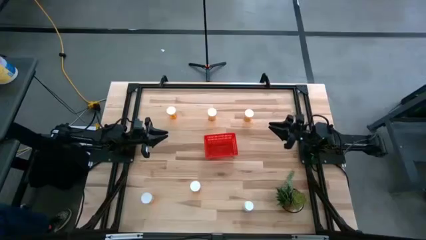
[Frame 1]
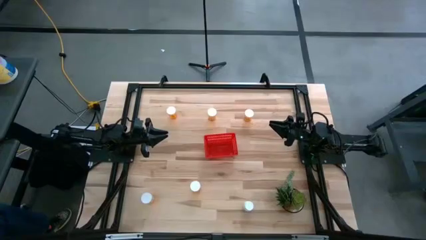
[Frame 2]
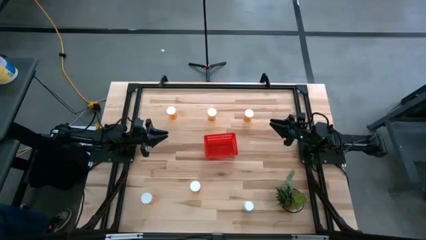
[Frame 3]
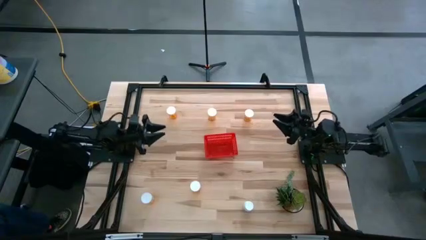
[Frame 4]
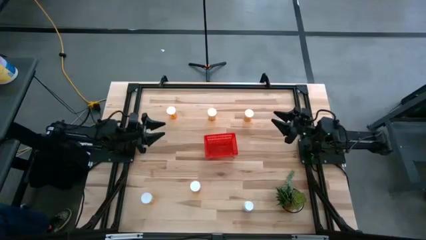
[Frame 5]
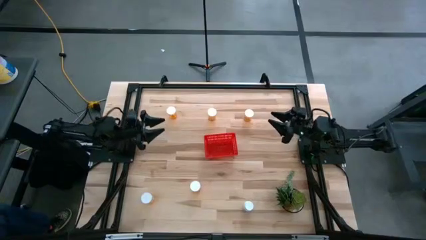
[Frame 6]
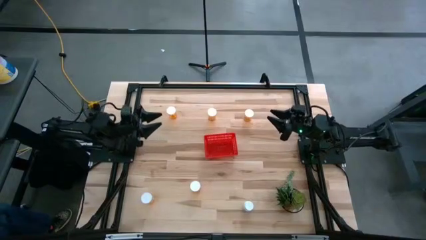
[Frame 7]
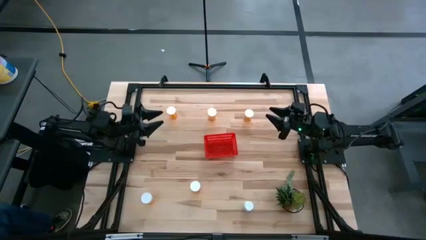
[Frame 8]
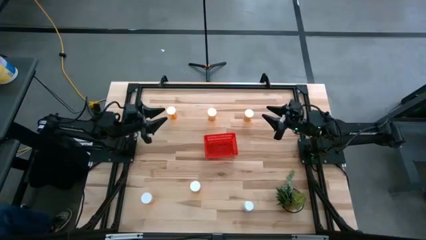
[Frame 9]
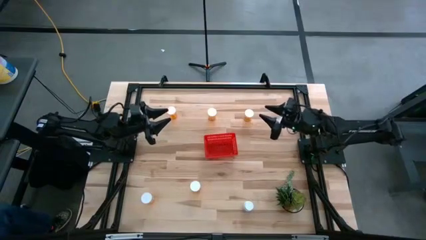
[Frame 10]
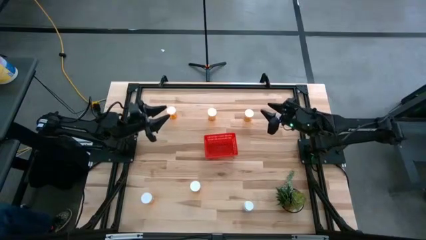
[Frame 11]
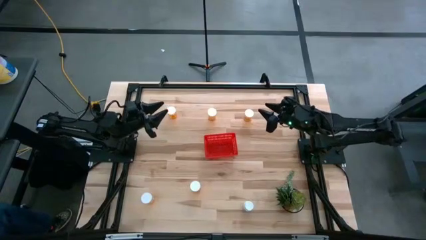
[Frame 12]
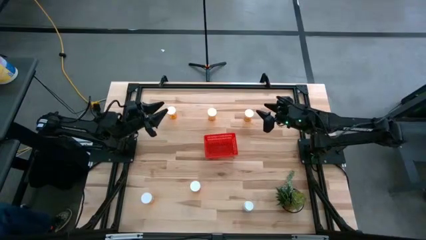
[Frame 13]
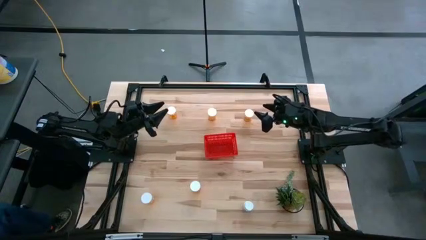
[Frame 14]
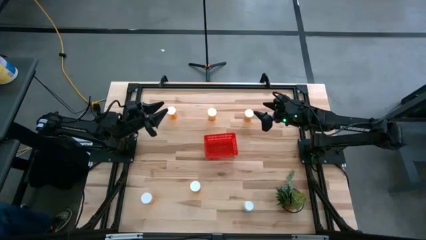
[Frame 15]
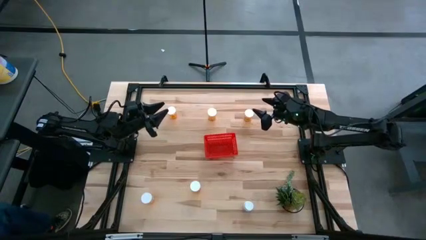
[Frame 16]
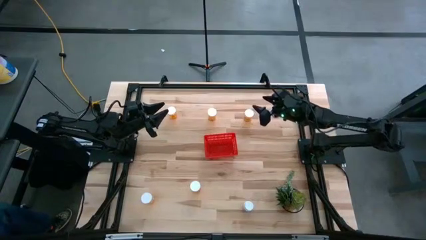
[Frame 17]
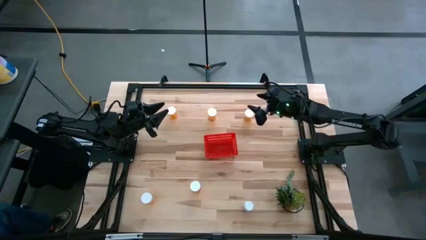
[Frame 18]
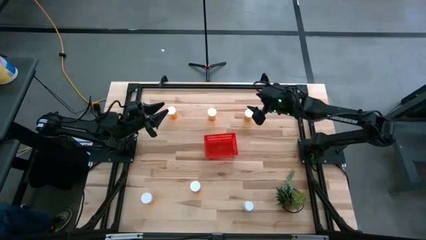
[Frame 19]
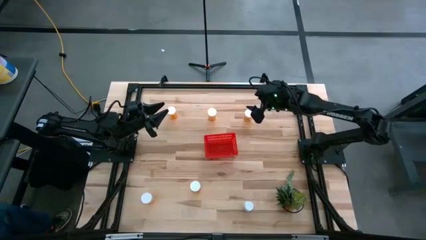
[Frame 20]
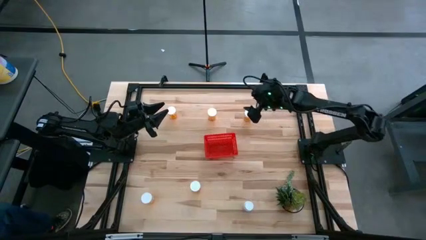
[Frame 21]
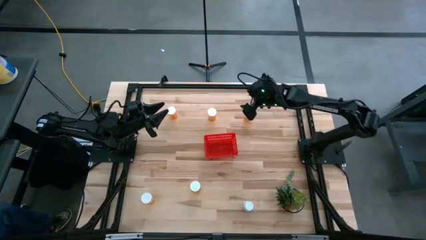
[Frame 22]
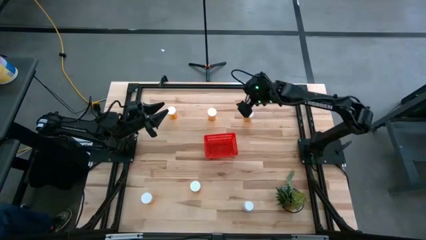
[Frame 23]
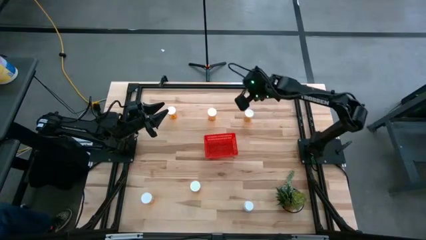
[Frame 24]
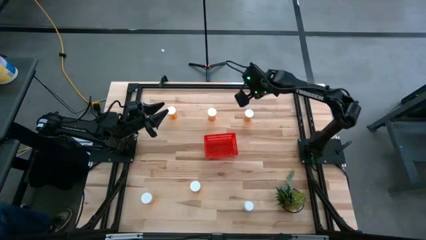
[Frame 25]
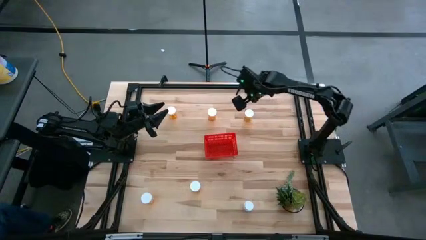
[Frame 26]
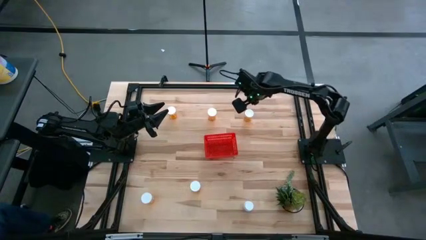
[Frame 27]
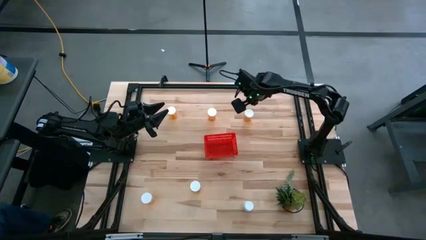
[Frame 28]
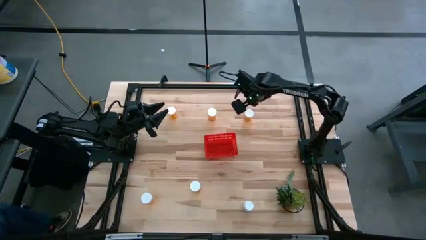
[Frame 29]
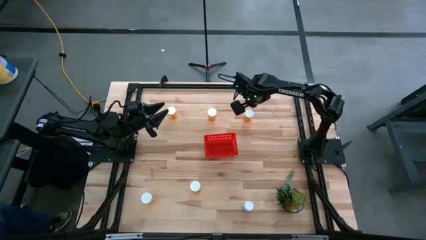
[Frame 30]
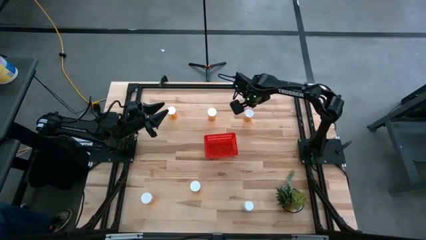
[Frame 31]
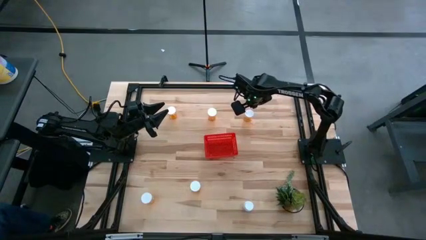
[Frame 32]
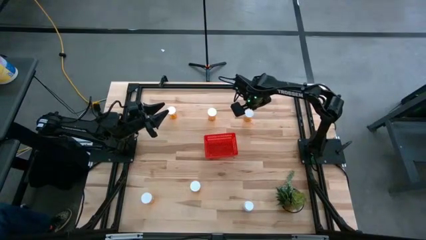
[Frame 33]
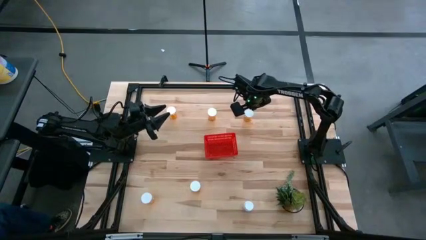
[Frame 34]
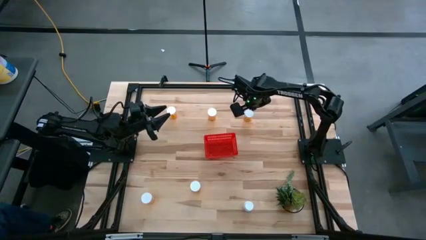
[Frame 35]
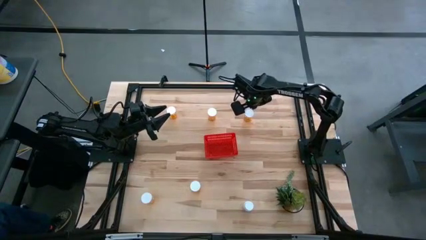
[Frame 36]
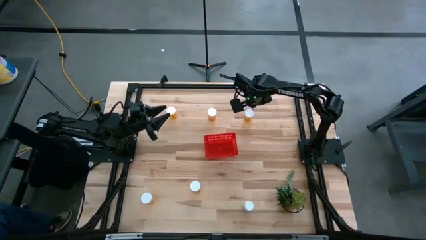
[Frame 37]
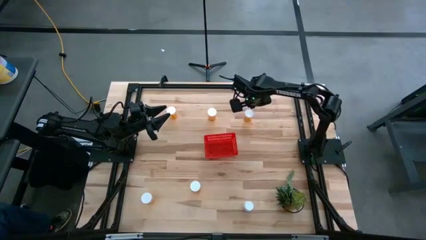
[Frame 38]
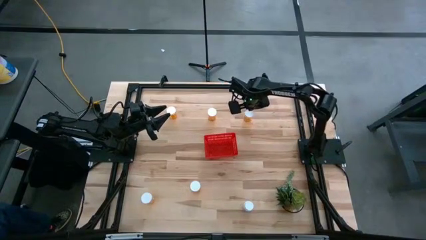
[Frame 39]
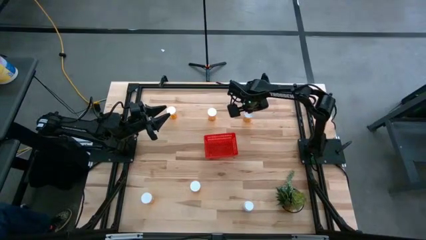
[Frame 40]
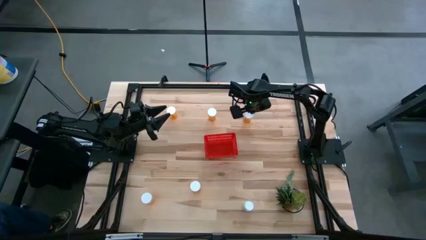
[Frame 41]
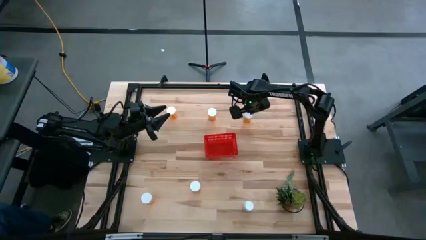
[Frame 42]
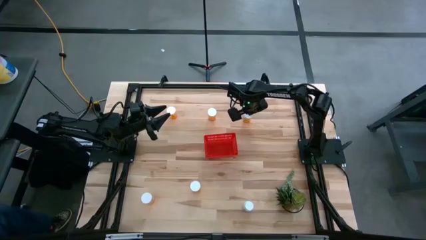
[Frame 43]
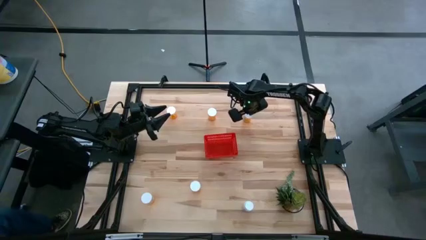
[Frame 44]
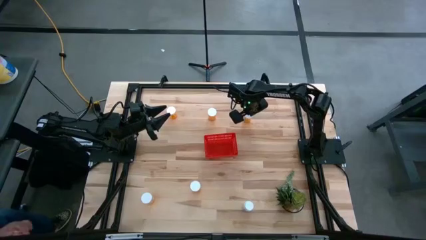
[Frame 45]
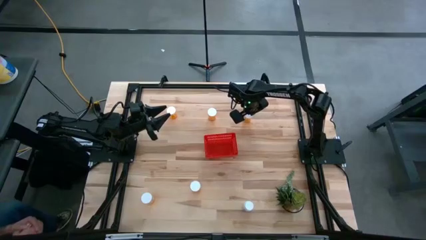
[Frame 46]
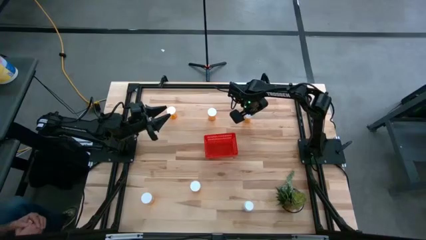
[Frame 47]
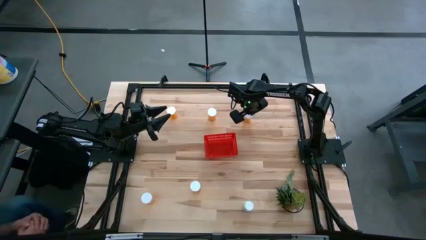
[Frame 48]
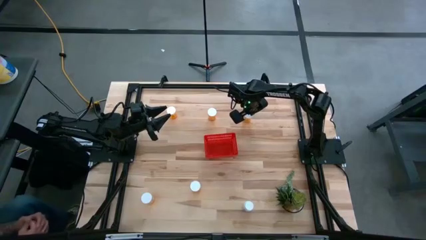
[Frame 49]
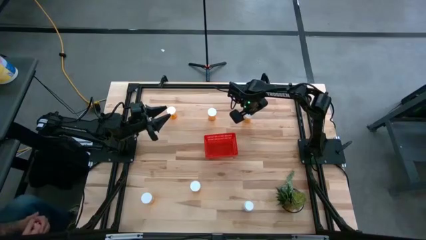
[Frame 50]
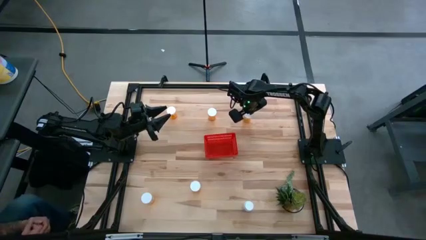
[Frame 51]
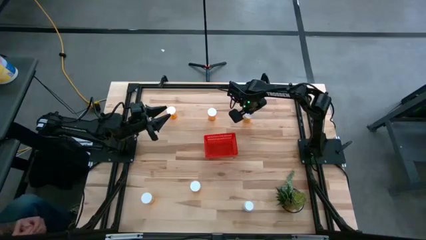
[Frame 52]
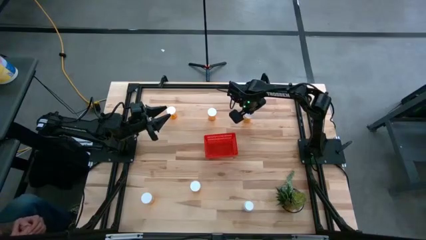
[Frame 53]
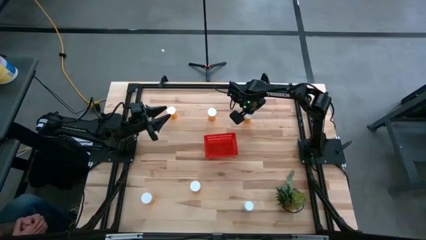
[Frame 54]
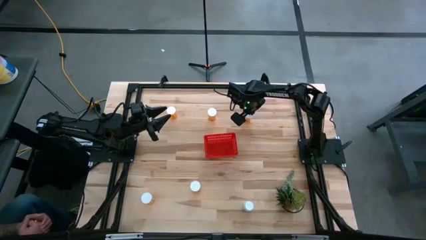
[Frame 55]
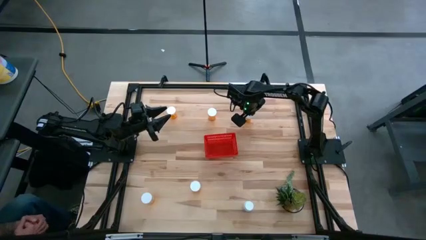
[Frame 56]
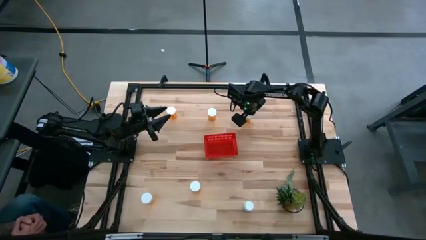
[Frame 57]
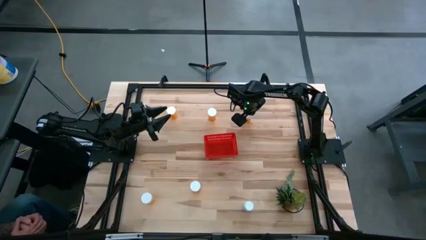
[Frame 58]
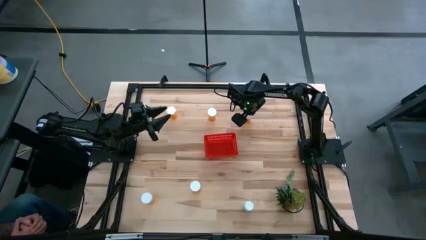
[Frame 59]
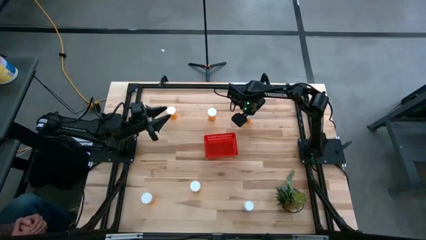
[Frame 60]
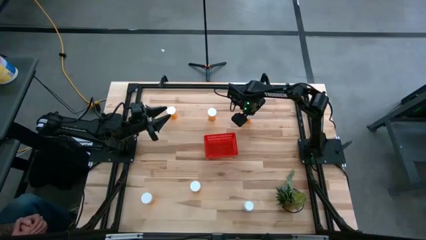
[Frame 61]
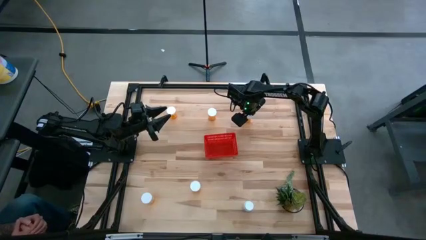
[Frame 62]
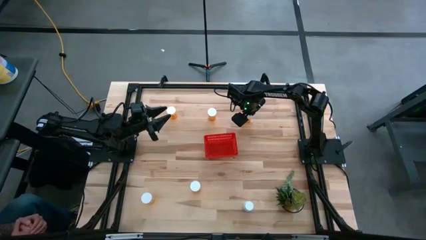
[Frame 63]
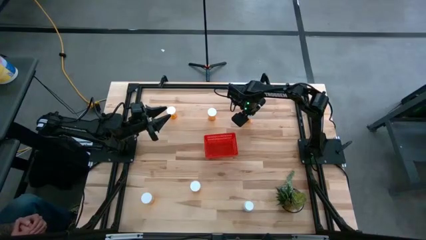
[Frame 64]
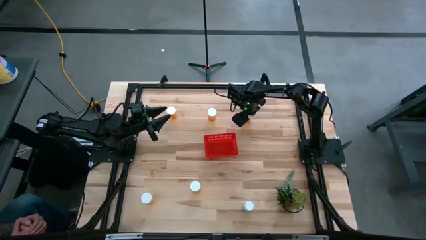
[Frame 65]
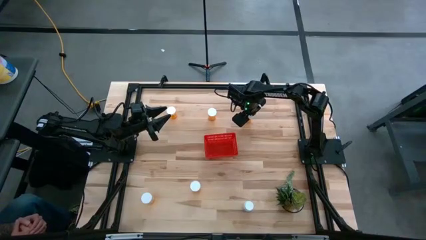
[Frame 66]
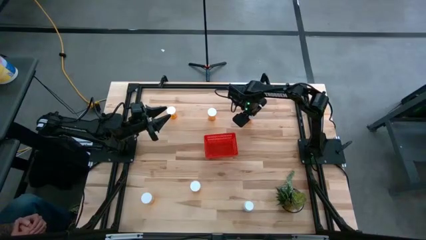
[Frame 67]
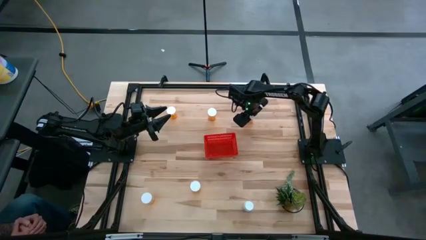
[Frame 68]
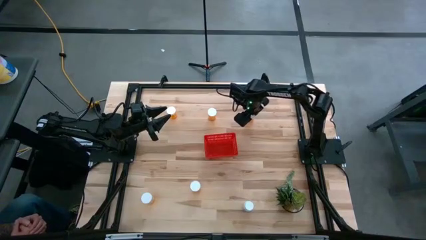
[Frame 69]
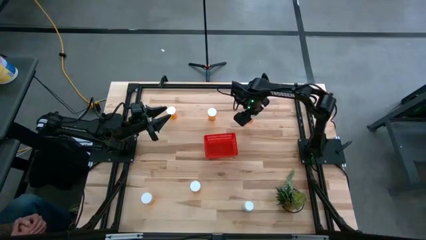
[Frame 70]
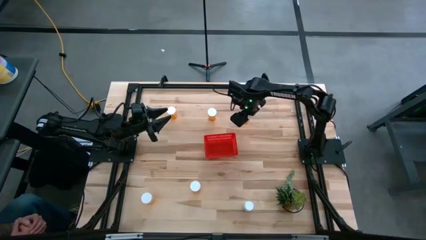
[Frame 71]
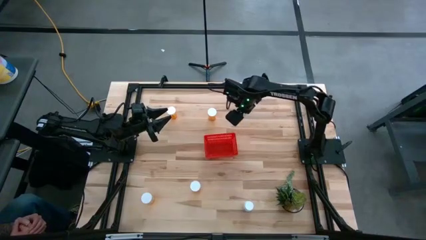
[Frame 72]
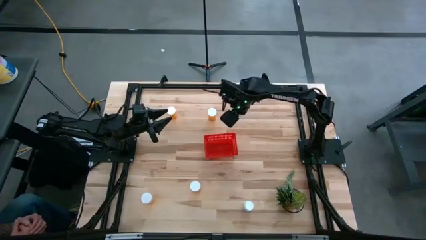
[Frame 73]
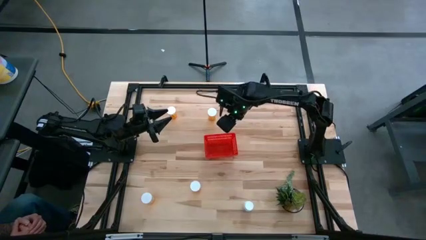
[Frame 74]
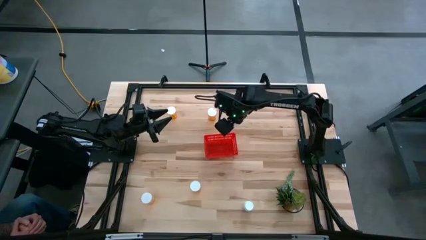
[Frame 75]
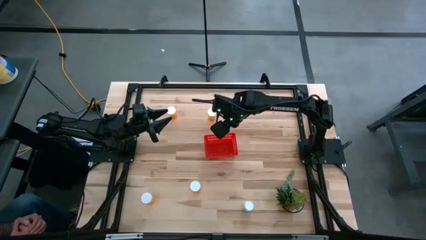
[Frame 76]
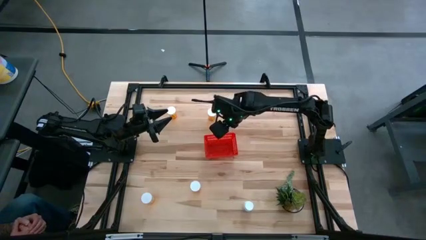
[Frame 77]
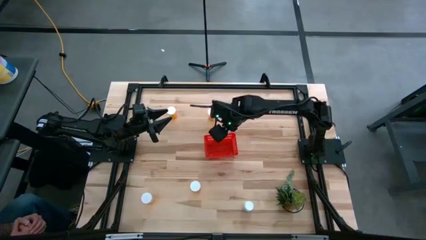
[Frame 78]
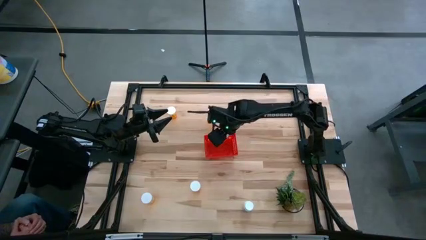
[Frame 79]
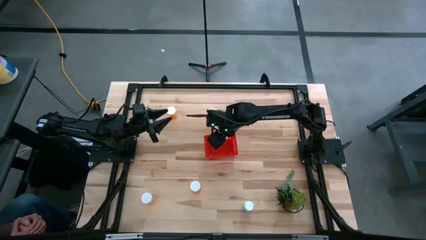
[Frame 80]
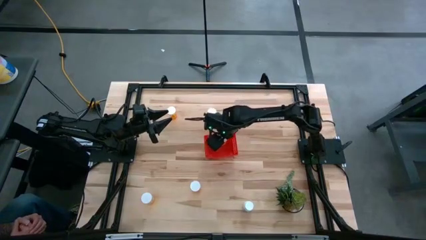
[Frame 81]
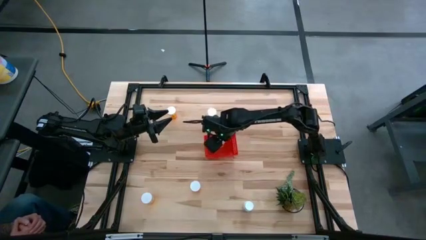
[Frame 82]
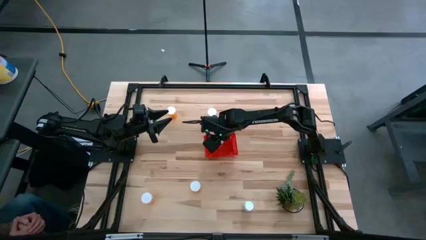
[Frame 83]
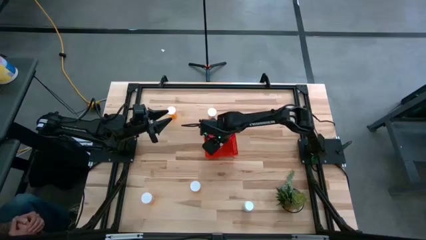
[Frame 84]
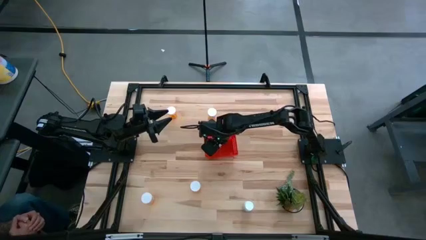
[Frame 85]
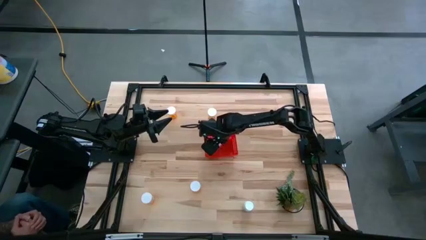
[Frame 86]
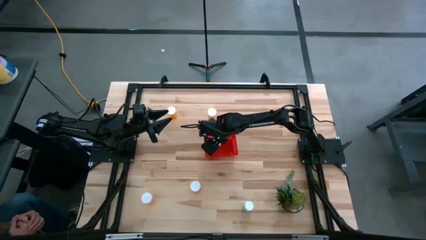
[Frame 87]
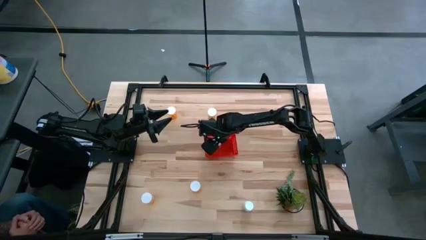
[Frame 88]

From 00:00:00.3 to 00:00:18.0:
Task: Pick and place pill bottles into a basket
Put the orange medicine bottle into the bin
